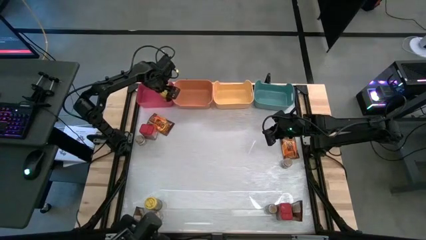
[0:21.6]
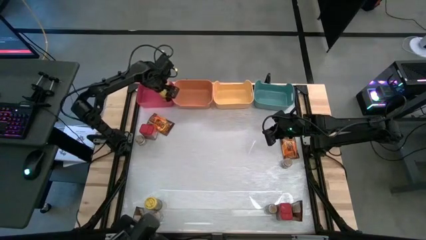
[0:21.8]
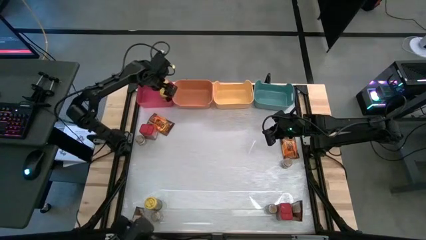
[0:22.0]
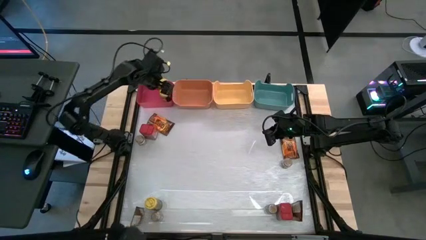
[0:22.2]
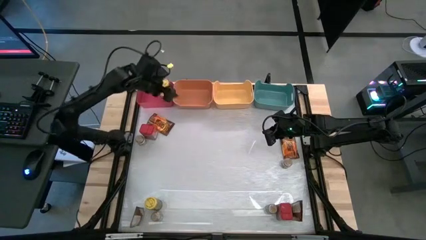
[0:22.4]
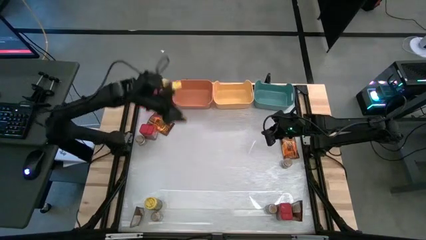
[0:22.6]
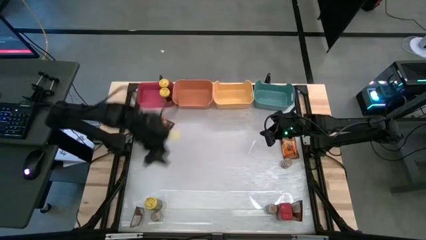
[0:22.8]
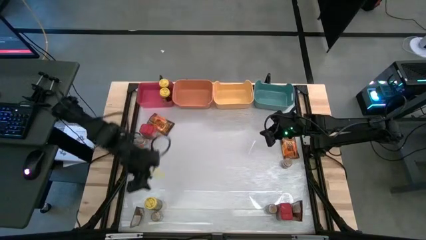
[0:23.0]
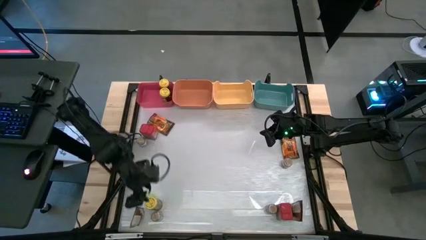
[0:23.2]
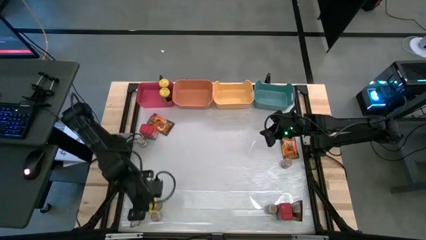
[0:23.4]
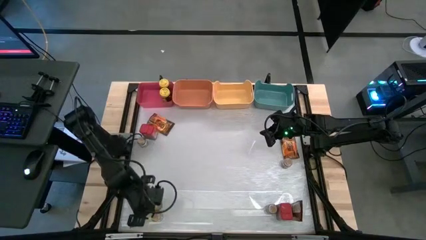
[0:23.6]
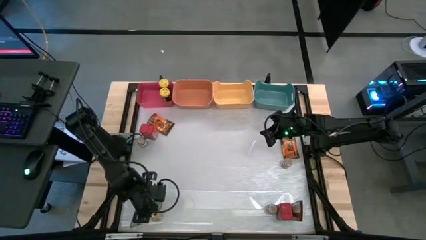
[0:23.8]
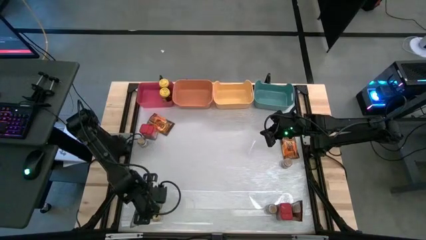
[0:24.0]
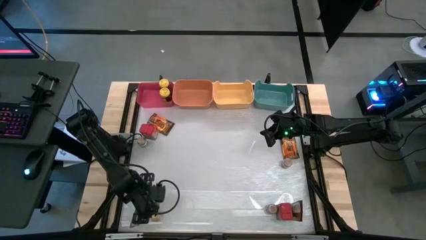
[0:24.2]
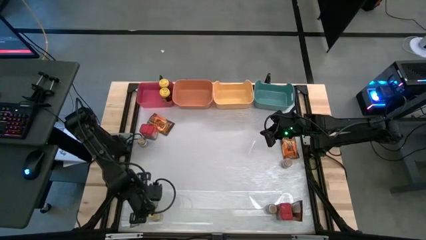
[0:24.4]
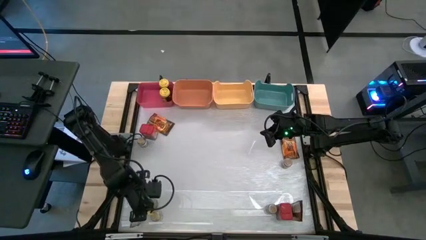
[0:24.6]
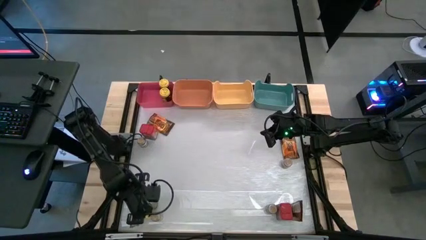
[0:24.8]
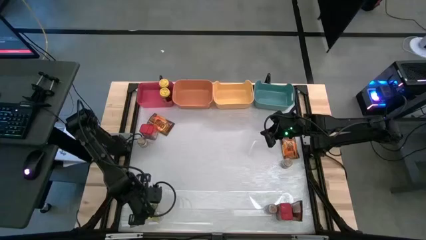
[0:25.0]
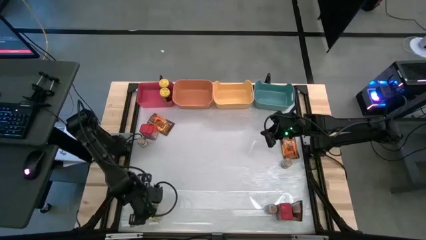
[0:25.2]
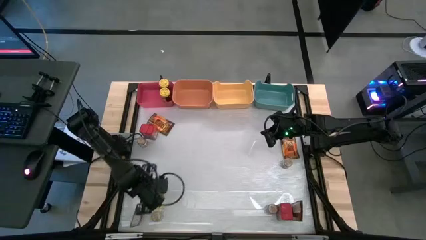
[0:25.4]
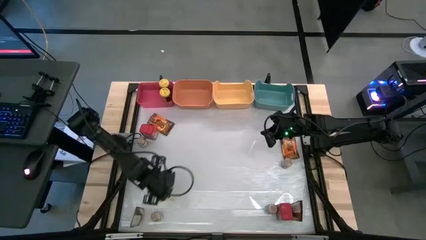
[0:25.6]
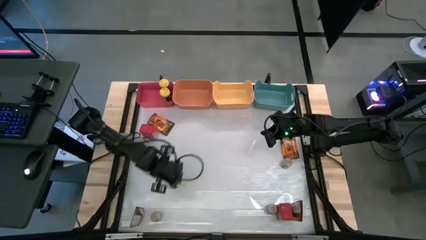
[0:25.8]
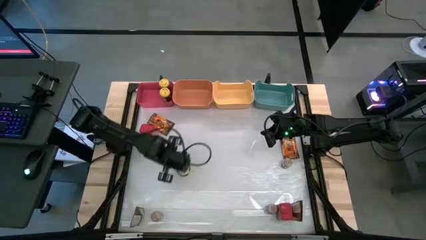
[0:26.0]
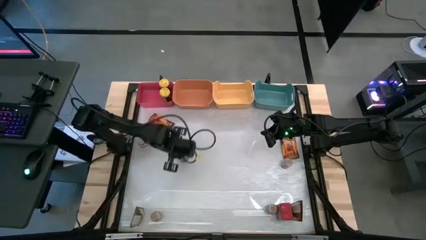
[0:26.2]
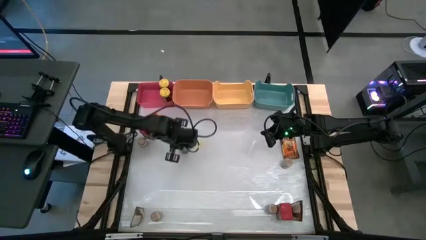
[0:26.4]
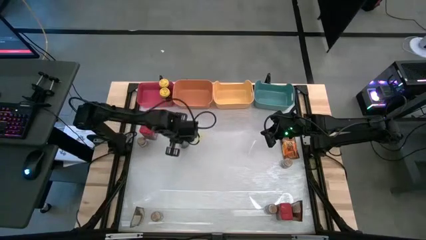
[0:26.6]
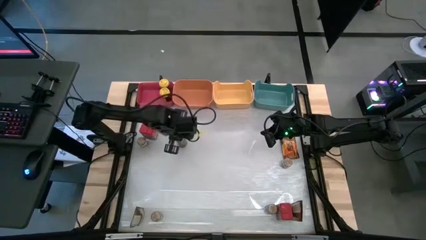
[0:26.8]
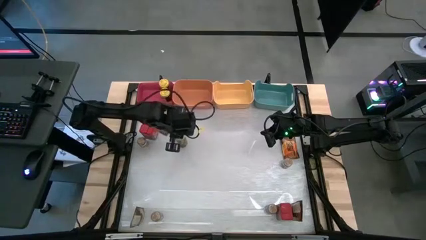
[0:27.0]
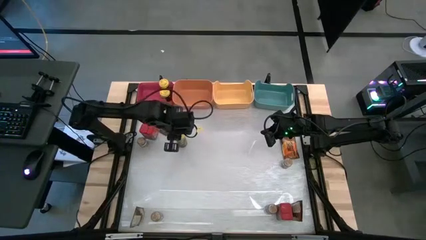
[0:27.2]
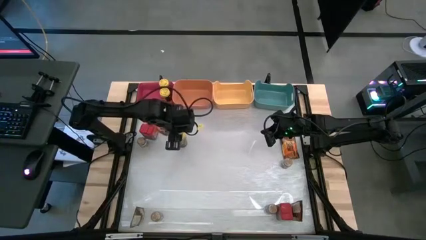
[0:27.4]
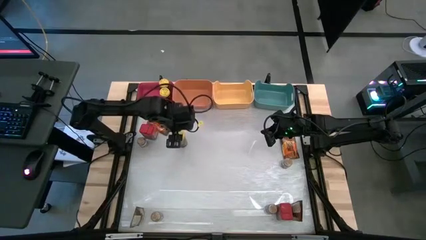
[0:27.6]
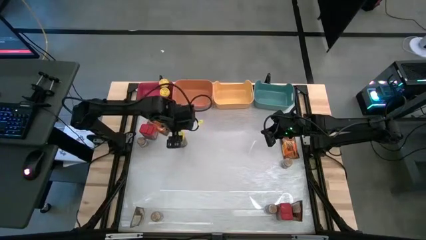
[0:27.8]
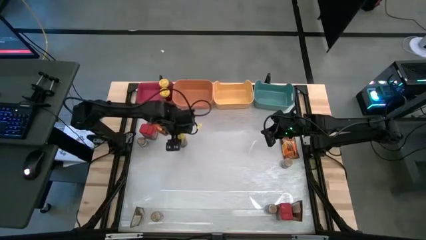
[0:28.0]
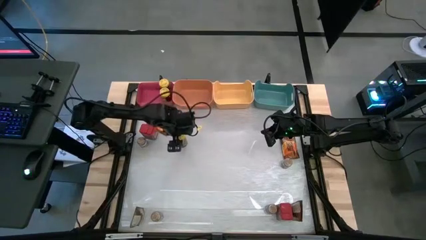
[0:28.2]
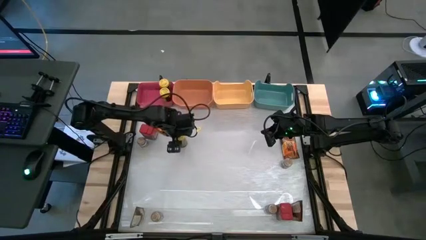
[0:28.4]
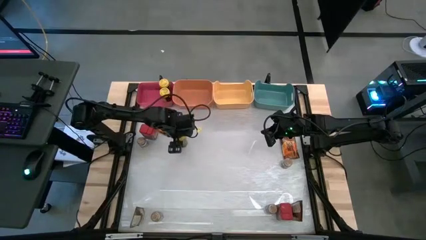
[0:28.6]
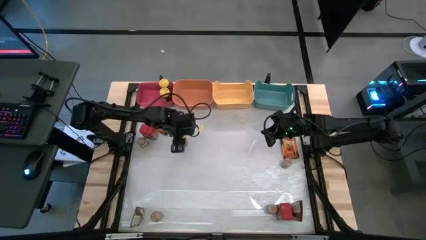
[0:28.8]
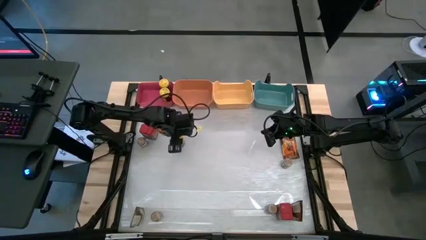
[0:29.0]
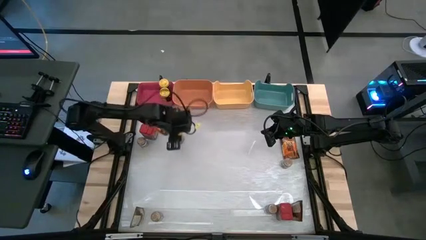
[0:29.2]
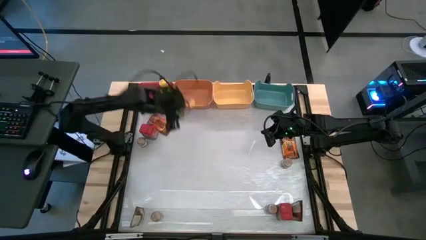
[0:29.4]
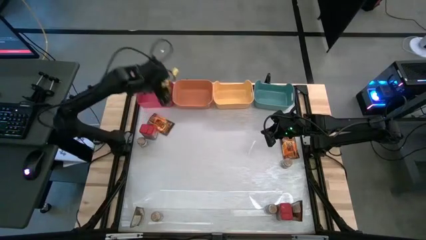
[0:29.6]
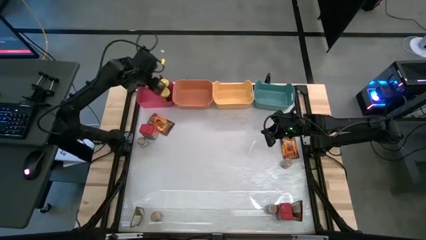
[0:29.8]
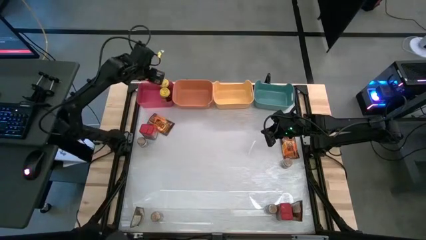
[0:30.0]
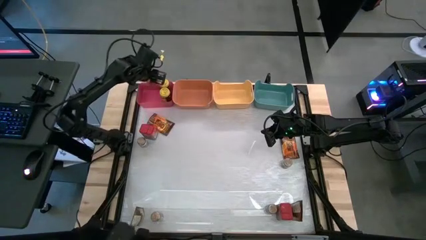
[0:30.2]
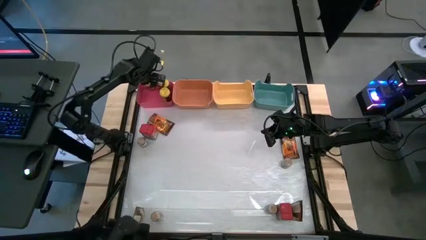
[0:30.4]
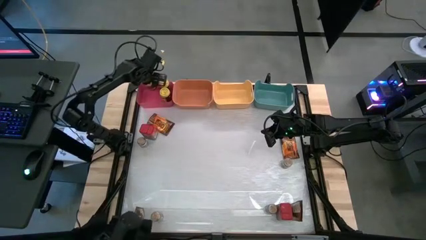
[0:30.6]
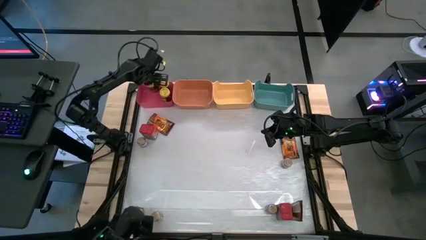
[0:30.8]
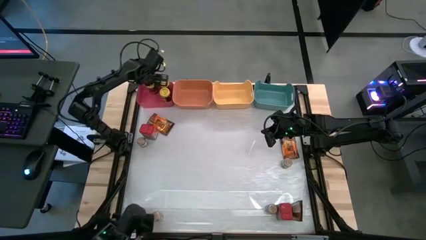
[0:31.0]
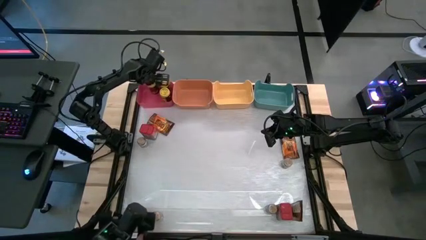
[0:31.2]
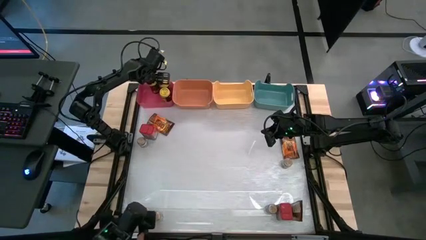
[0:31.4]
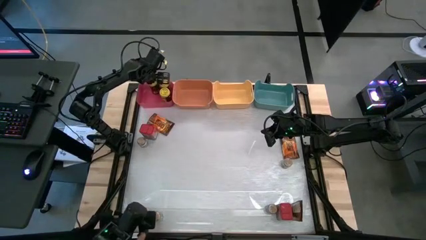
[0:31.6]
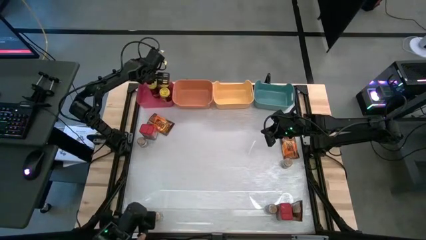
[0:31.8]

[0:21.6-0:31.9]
Task: Sort spices by type
Put the yellow seasoning can into the pink bin

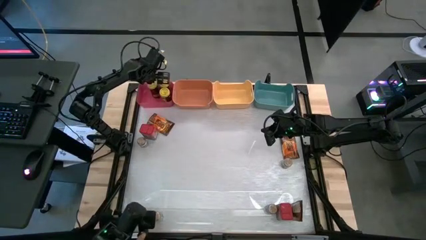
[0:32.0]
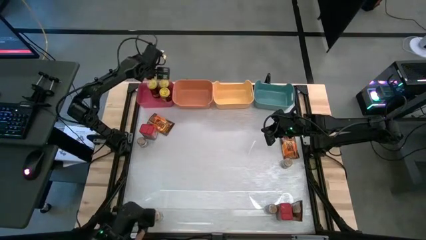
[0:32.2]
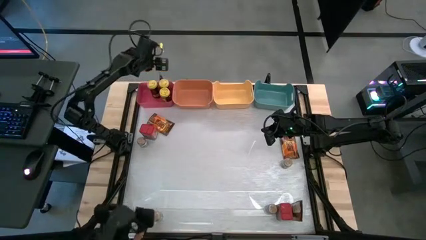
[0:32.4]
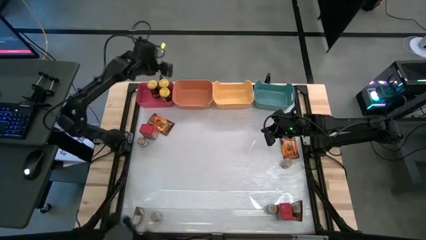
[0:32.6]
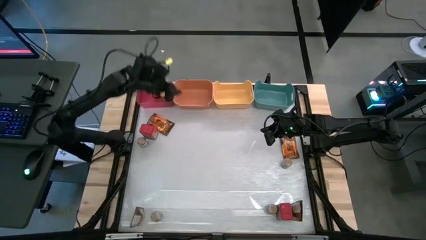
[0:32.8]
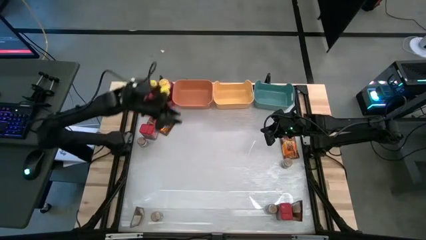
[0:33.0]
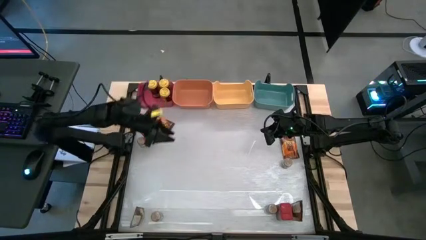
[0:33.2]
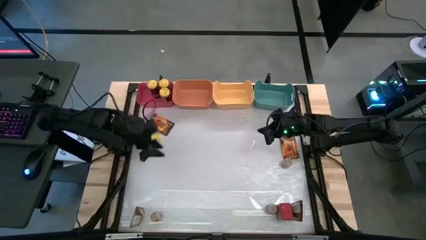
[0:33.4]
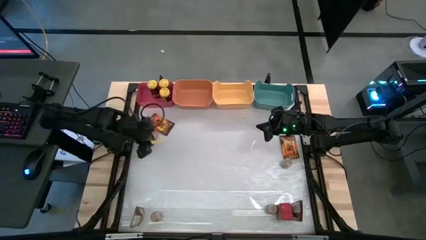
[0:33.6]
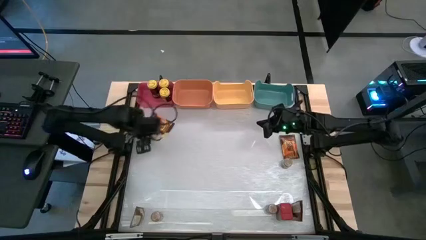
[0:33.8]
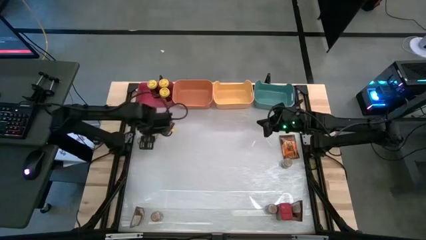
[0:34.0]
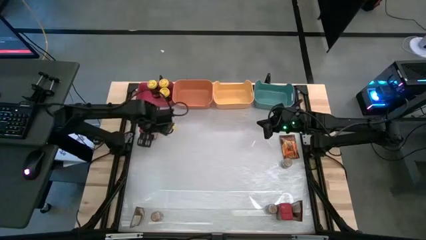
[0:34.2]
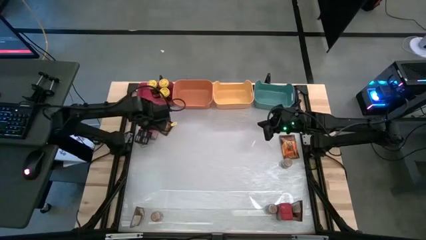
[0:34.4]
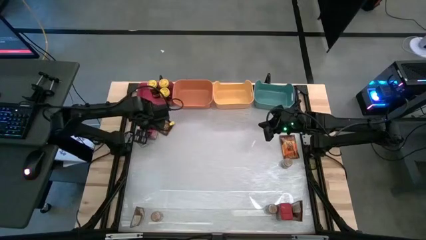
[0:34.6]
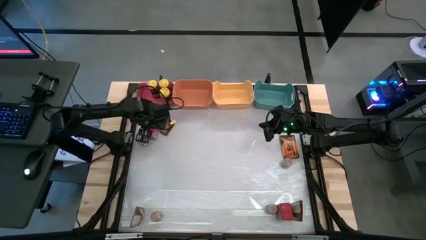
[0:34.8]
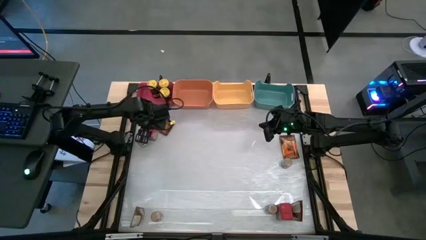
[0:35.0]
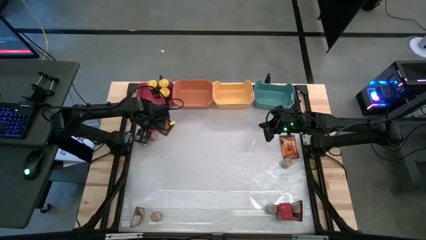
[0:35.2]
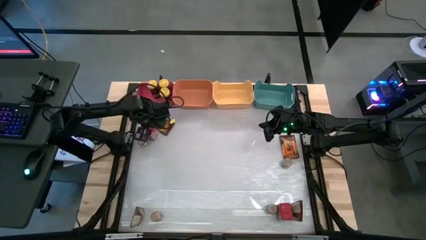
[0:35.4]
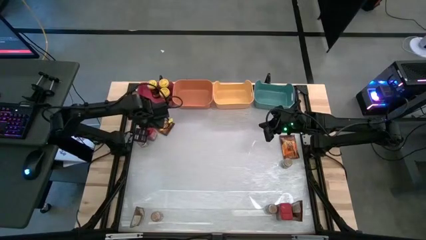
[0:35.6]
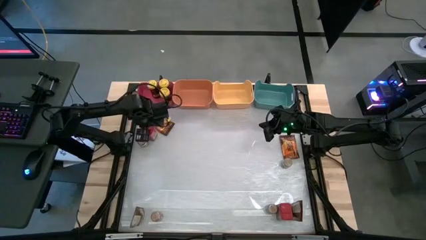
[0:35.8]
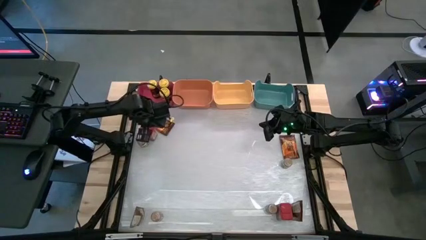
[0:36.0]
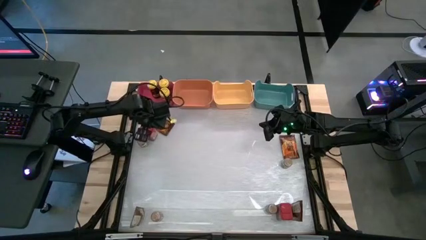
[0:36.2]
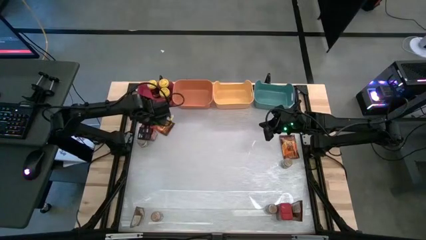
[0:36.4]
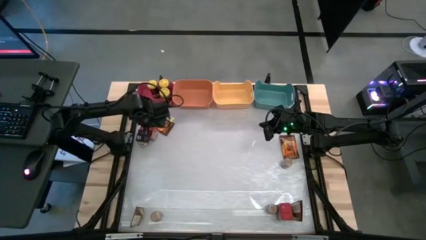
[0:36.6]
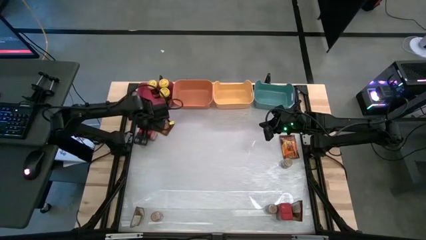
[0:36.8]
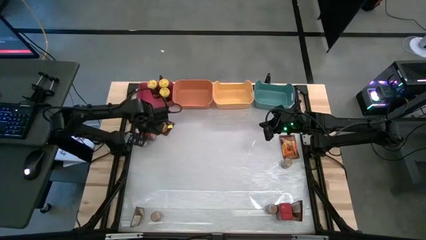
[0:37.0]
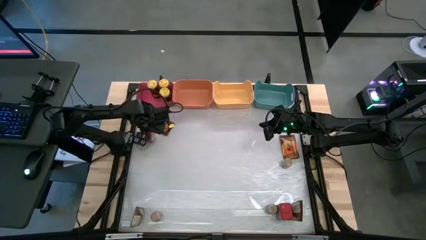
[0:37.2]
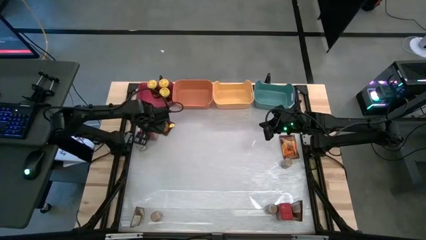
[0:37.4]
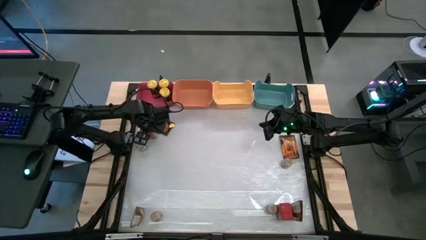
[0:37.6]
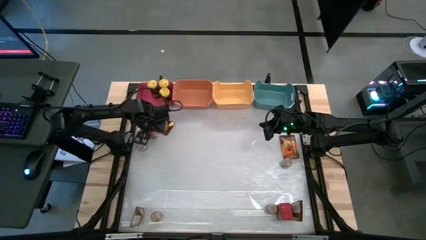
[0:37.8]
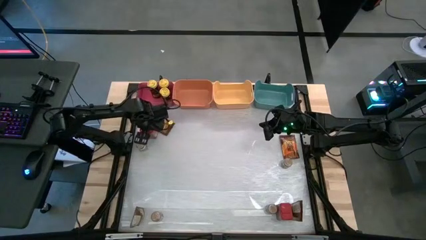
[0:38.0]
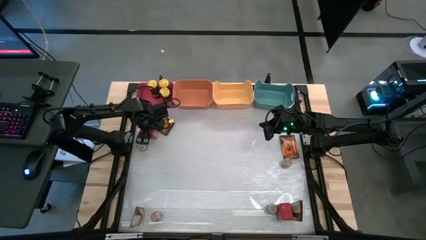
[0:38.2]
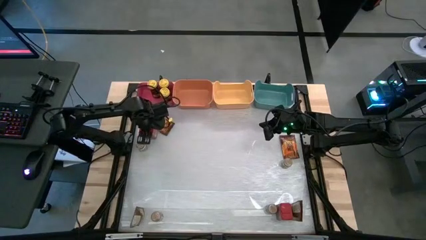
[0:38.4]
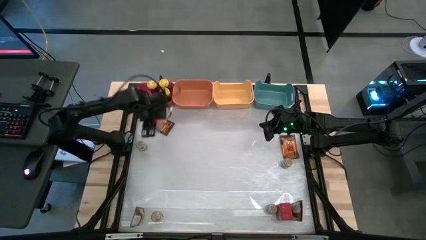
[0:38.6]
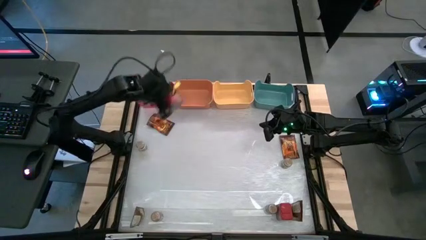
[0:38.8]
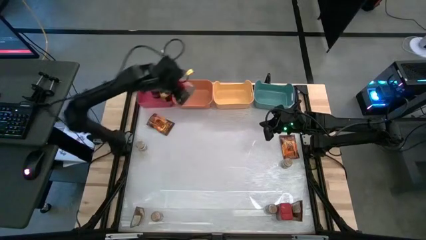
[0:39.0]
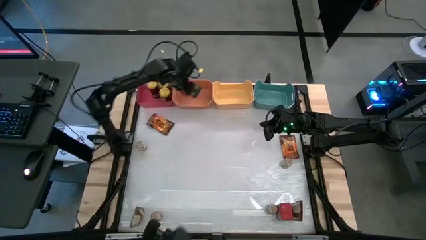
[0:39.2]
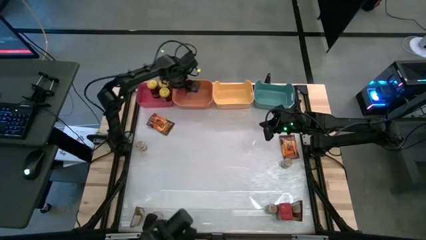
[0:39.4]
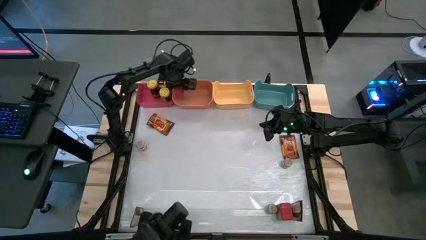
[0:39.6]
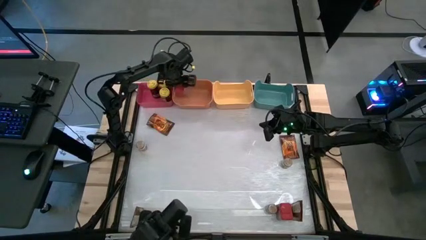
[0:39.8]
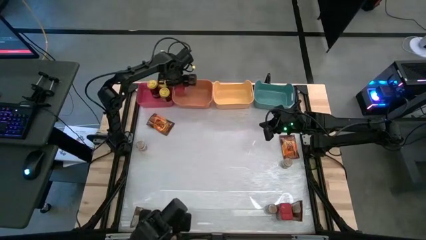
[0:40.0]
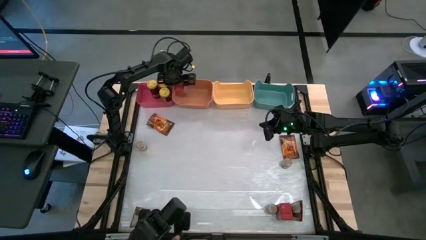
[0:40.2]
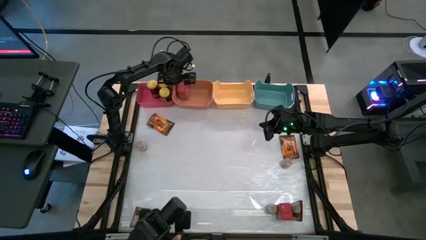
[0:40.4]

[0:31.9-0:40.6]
Put the top red seasoning can into the orange bin
